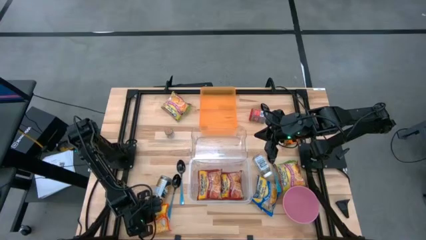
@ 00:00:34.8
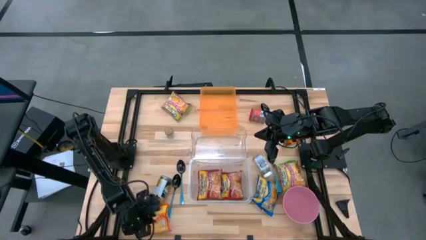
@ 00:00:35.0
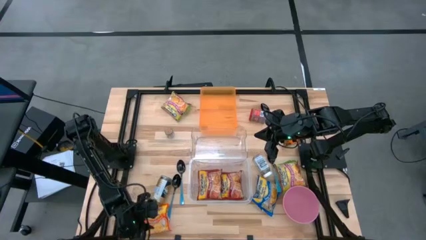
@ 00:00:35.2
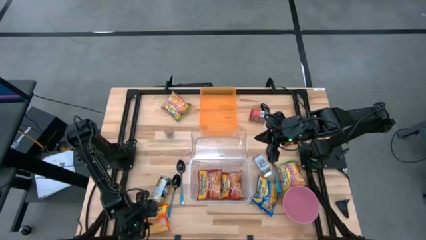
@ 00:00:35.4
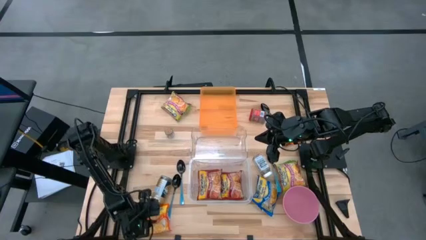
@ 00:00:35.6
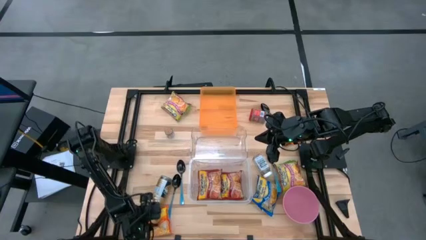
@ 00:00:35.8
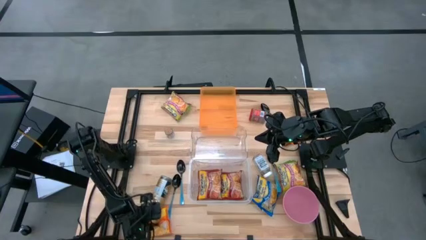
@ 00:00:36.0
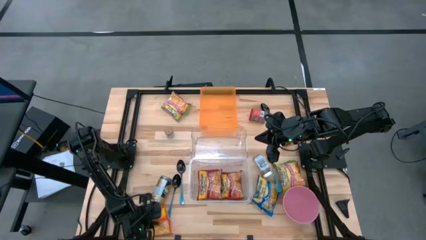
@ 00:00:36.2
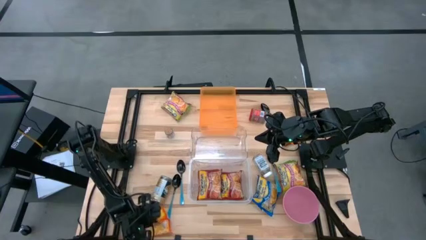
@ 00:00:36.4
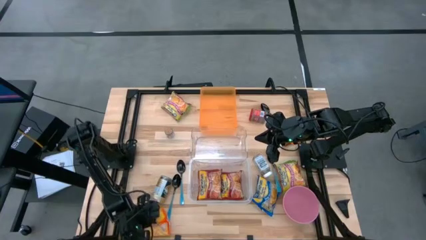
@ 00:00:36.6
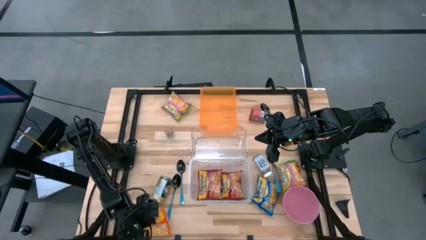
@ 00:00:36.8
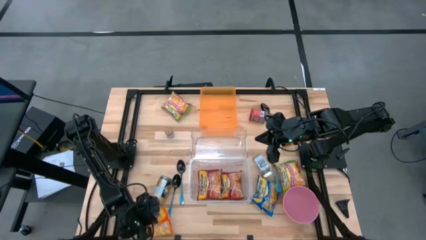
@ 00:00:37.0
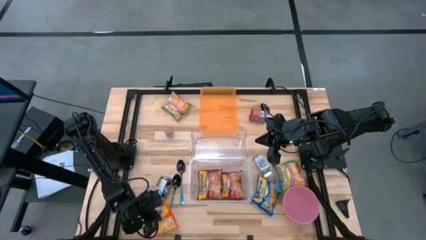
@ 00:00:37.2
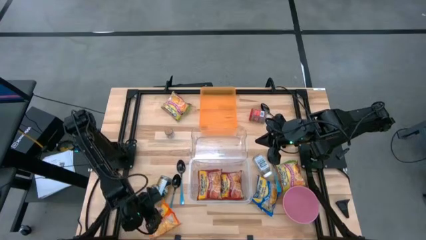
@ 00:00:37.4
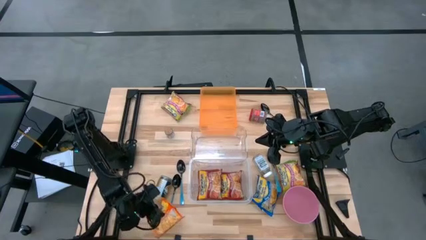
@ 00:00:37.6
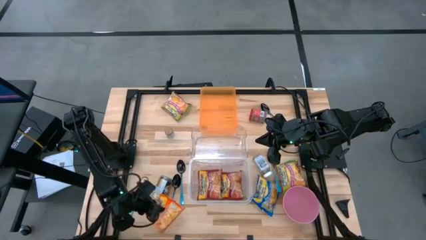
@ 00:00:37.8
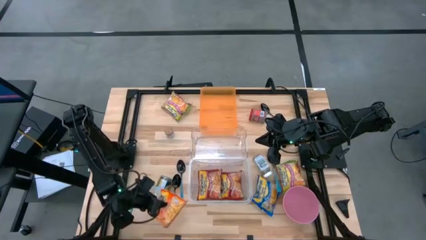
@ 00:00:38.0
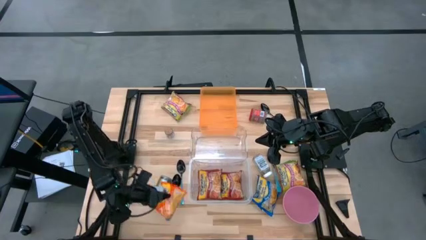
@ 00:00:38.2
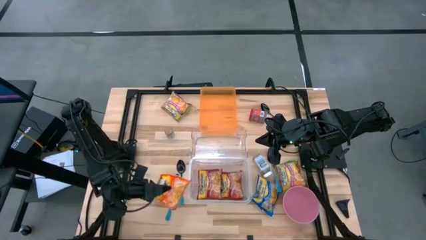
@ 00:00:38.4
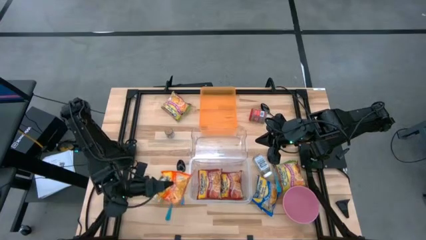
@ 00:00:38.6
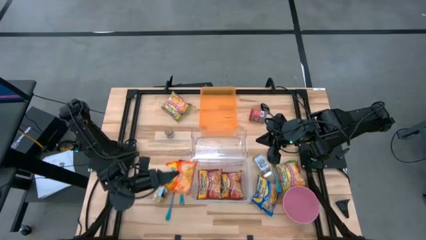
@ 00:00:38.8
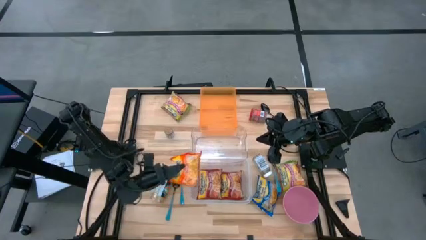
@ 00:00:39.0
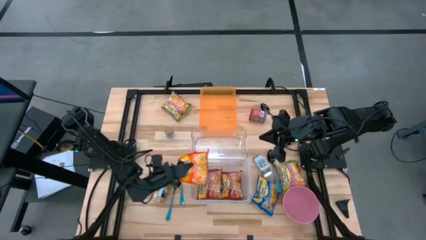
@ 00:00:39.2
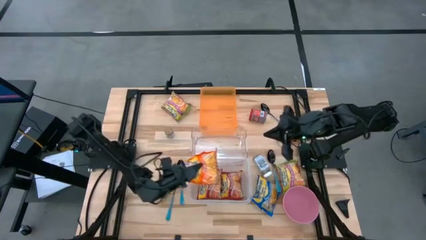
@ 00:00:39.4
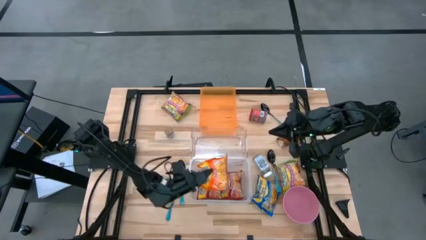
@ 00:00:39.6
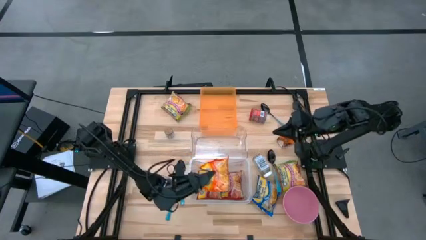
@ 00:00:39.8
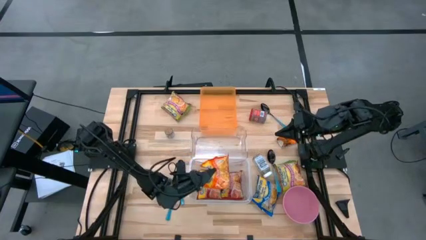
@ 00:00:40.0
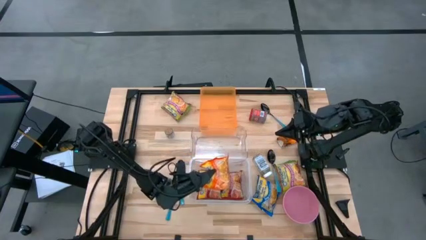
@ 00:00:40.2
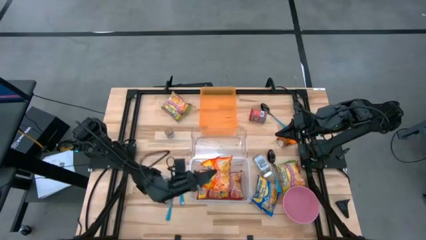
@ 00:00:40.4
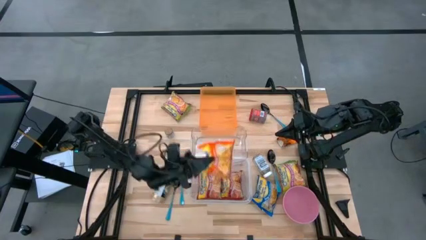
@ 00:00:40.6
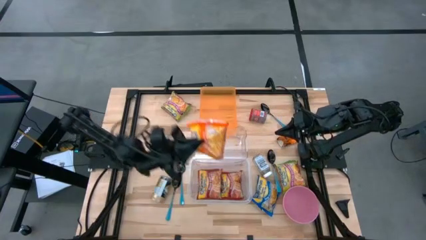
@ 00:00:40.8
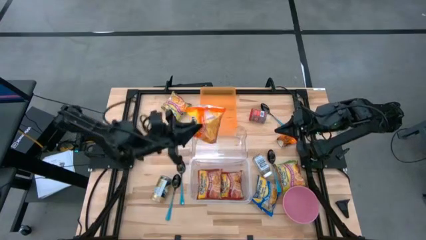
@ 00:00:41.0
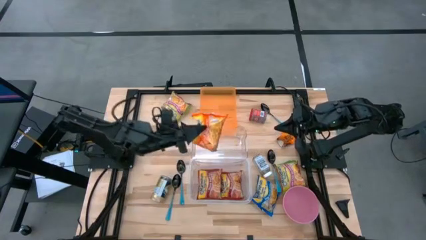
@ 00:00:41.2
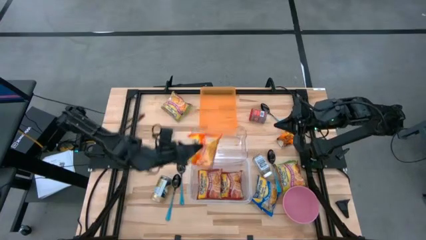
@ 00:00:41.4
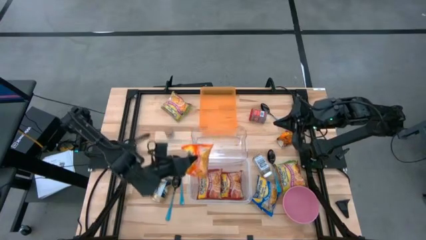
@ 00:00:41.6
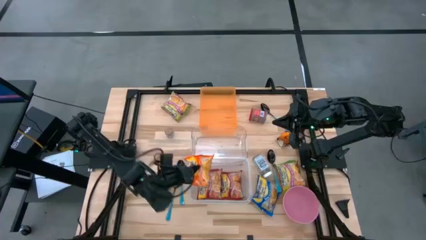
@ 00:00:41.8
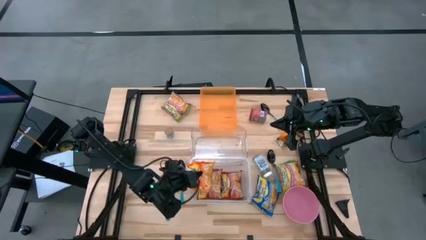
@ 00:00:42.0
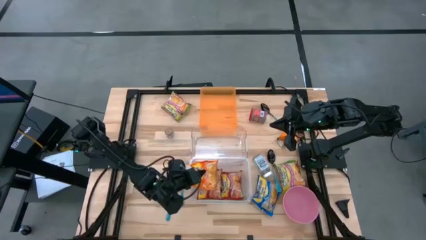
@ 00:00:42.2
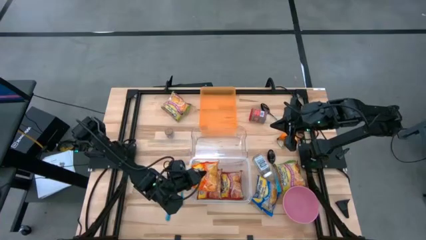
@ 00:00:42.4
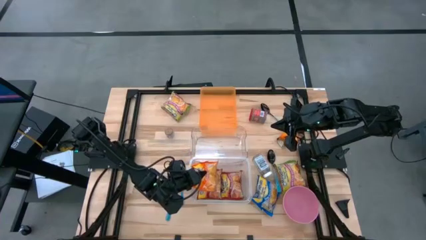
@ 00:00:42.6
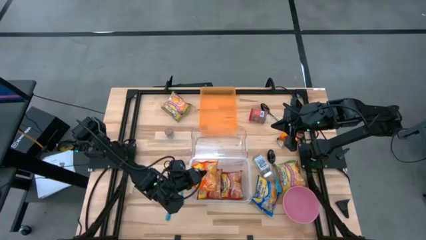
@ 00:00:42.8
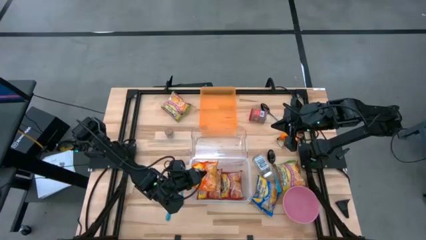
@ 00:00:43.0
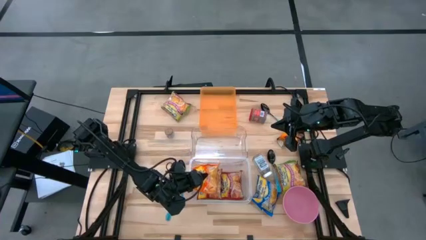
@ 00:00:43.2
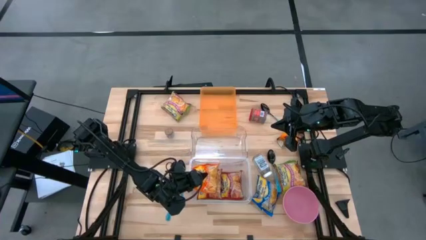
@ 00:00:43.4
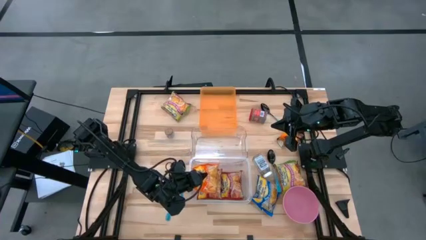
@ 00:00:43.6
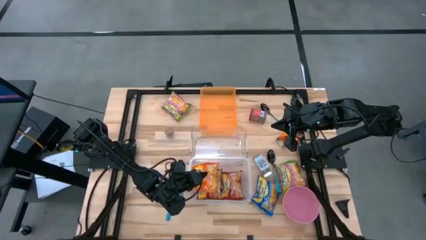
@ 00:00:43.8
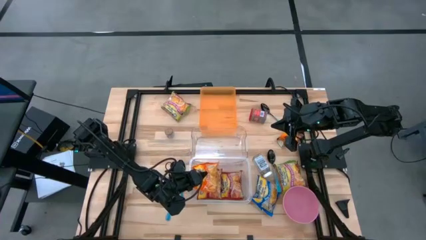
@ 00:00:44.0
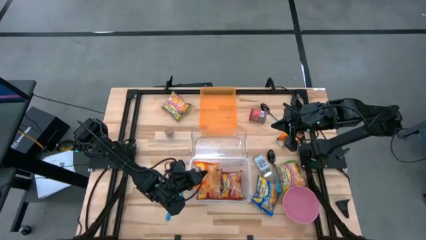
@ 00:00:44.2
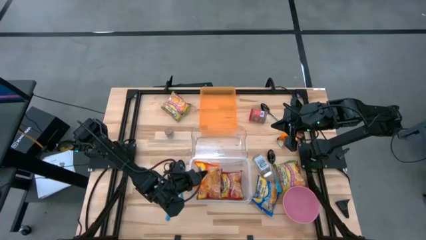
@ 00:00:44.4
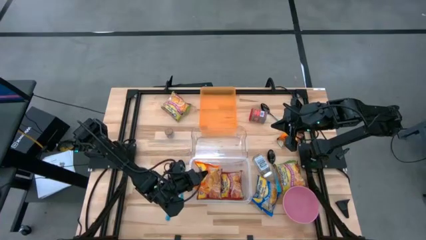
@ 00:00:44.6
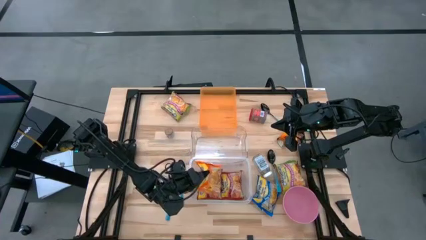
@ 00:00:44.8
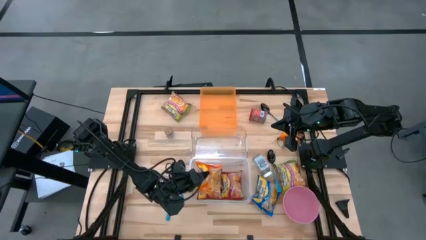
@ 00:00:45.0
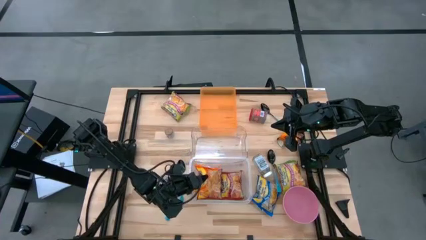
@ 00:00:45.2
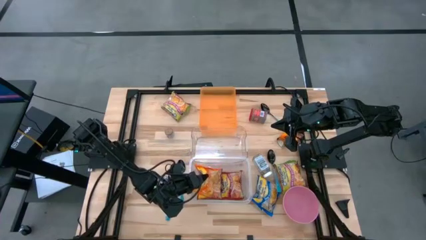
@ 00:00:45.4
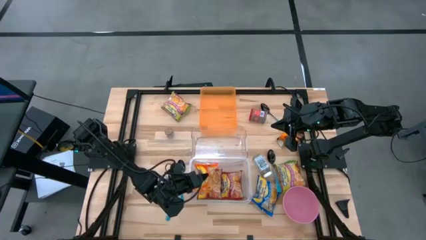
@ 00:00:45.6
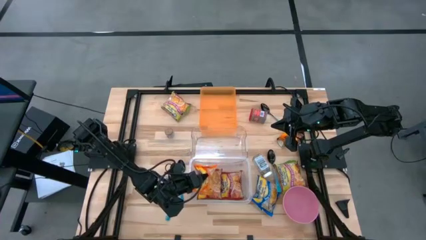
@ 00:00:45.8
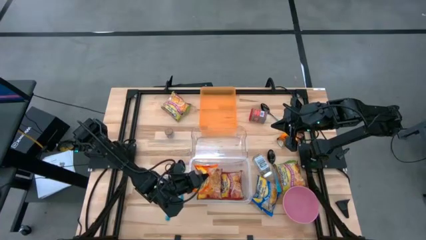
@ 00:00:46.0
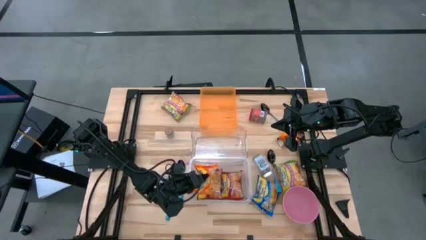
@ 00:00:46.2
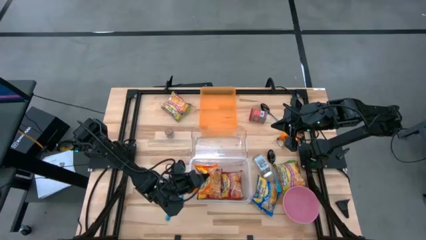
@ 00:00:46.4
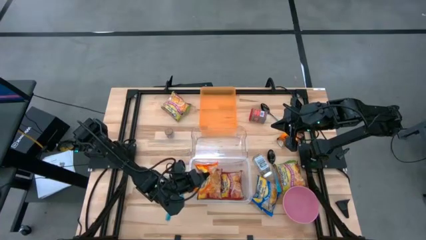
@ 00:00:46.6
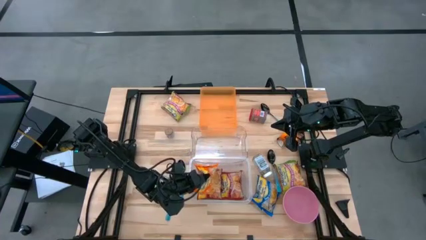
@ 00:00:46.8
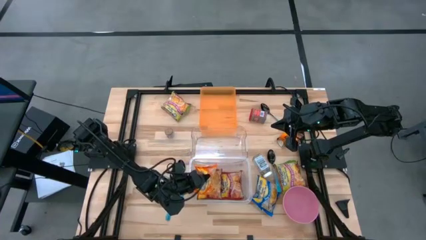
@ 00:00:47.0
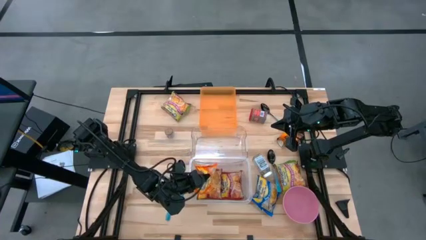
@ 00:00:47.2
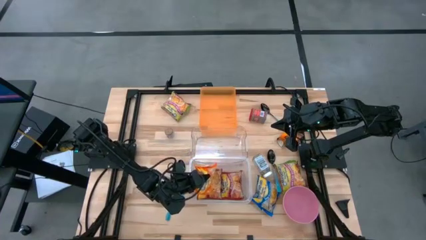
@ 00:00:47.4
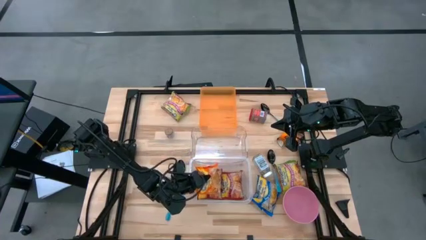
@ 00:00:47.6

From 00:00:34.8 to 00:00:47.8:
Task: Pick & Place Food Item
Put the orange noodle pack into the white transparent bin

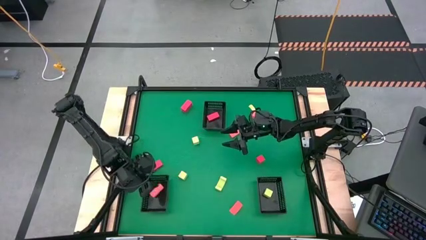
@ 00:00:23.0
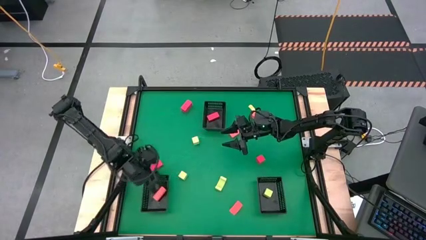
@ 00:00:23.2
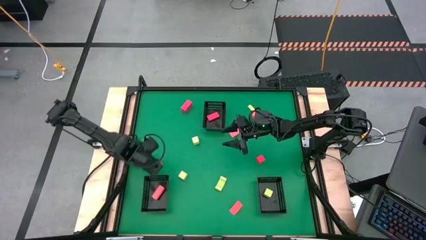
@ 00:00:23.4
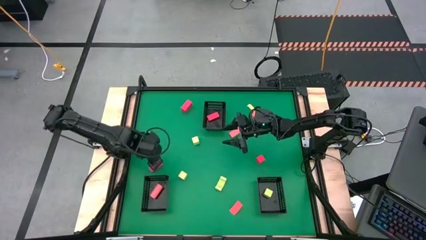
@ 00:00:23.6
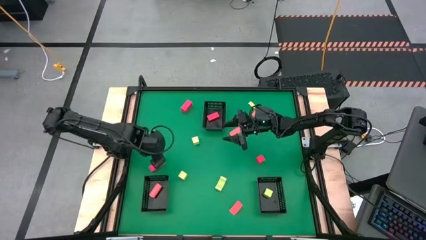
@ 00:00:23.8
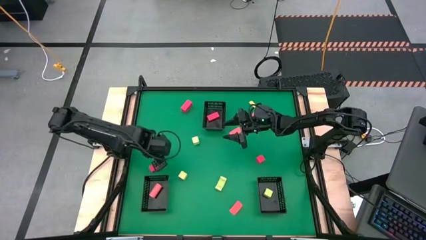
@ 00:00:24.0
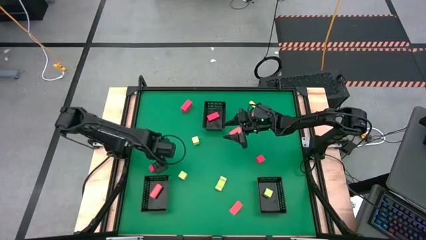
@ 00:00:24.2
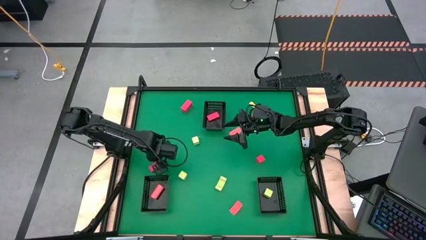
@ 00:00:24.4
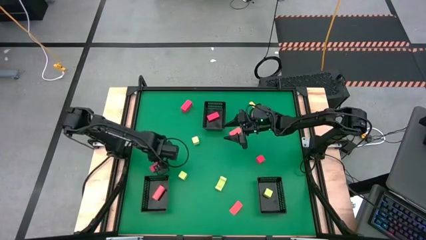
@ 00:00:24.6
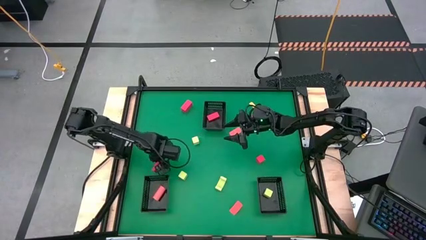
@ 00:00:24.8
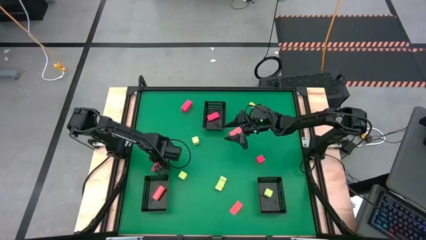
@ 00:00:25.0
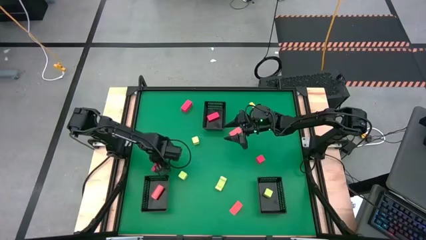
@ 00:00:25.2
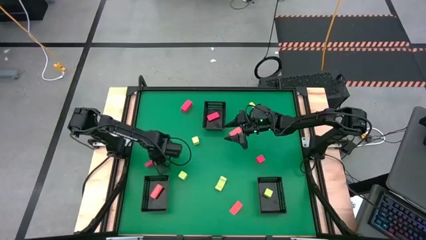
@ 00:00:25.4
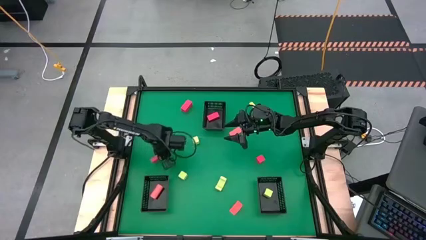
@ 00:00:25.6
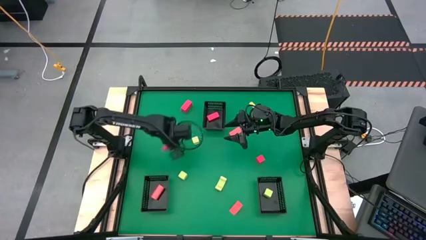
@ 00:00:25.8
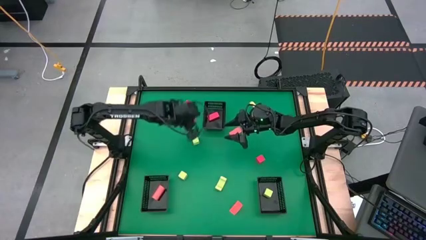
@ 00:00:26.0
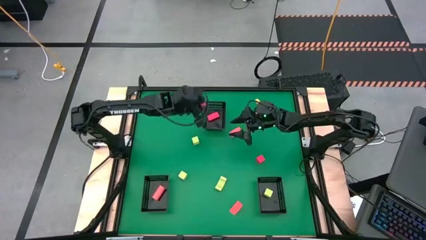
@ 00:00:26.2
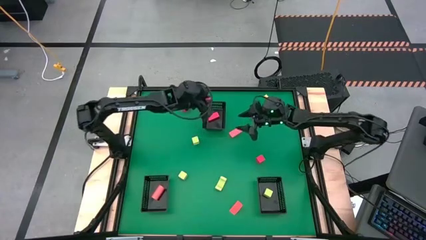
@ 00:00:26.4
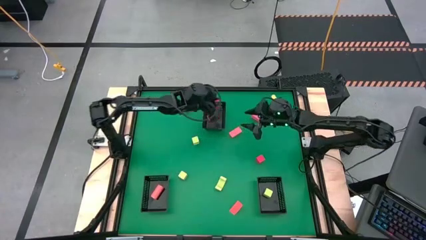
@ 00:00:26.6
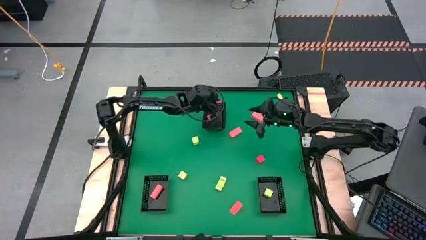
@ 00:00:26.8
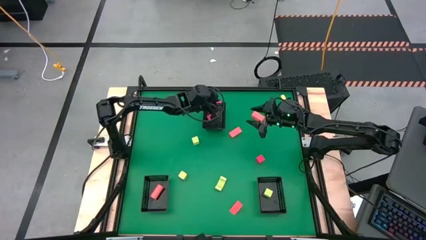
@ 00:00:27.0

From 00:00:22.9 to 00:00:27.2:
Task: Sort & place blocks by color
Put the red block into the top black bin
